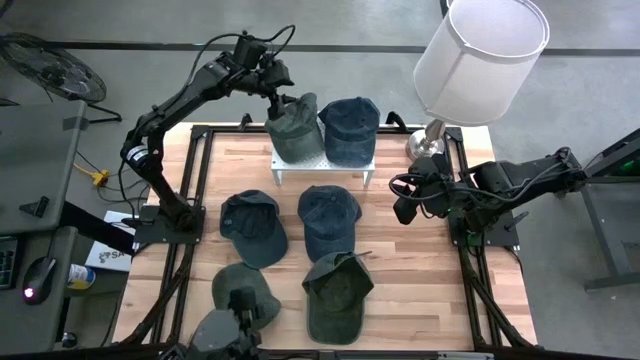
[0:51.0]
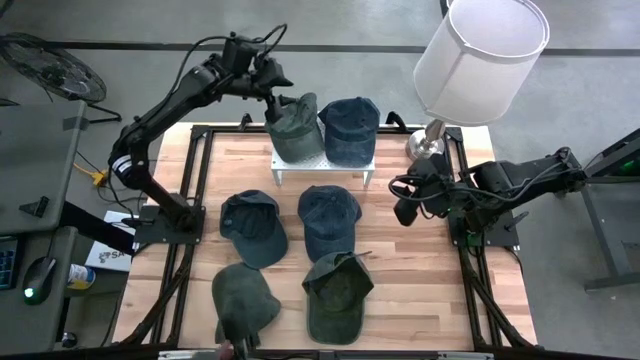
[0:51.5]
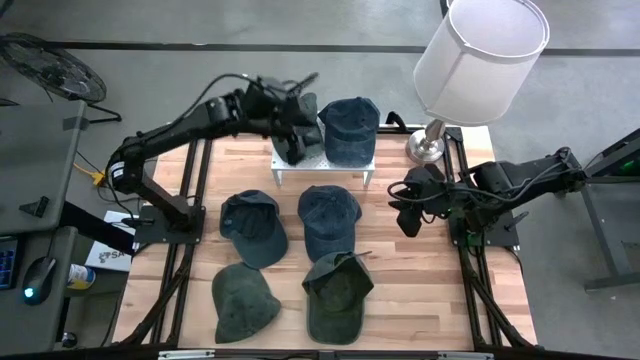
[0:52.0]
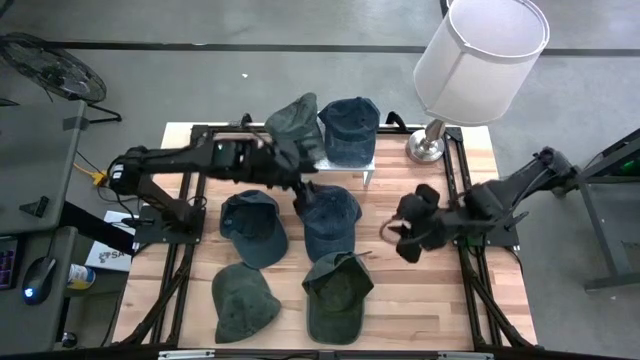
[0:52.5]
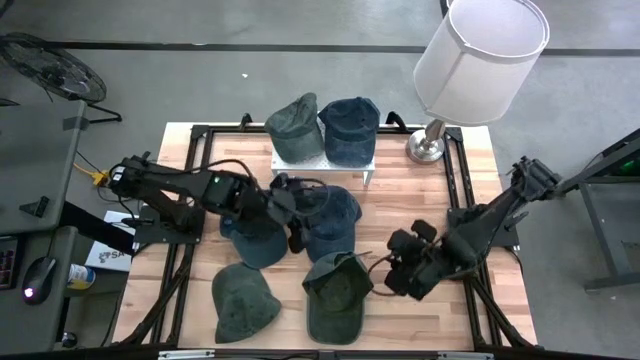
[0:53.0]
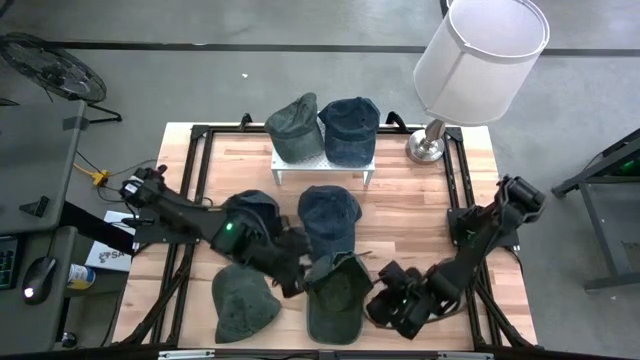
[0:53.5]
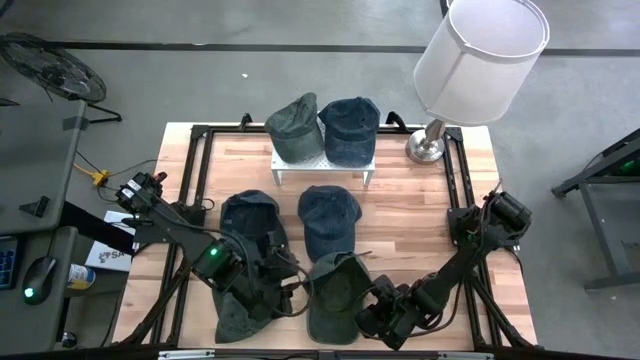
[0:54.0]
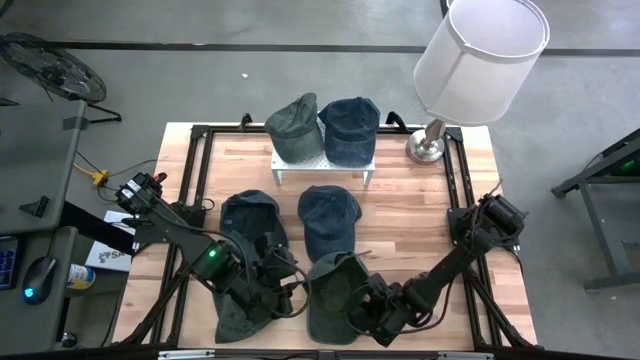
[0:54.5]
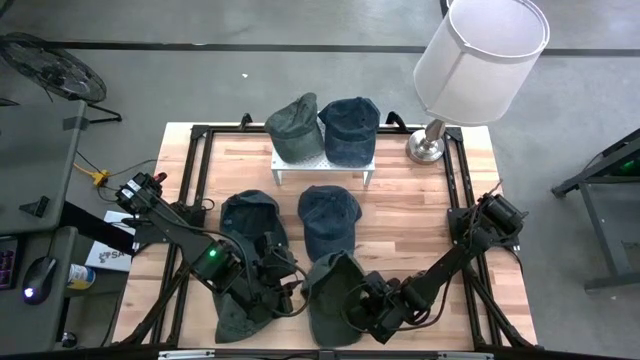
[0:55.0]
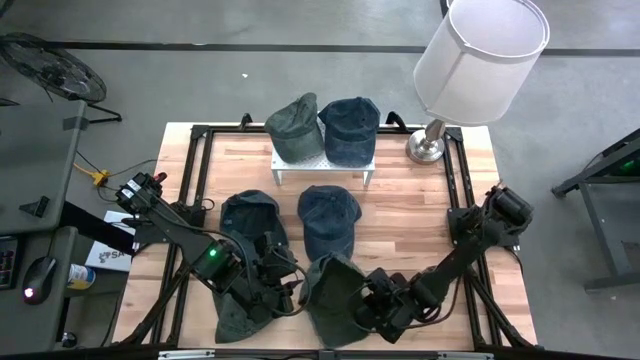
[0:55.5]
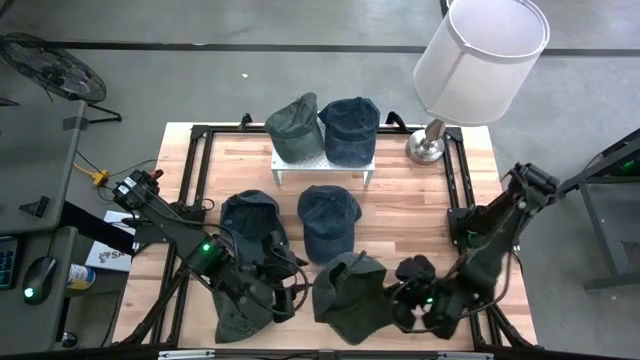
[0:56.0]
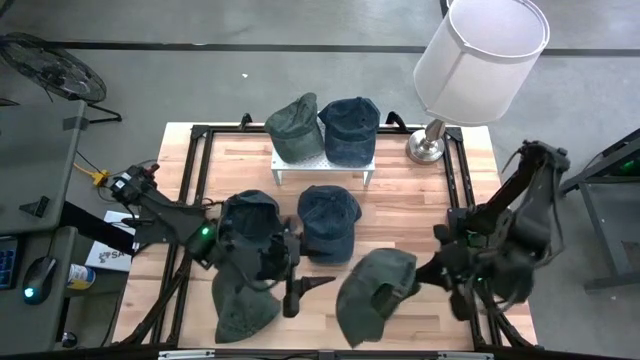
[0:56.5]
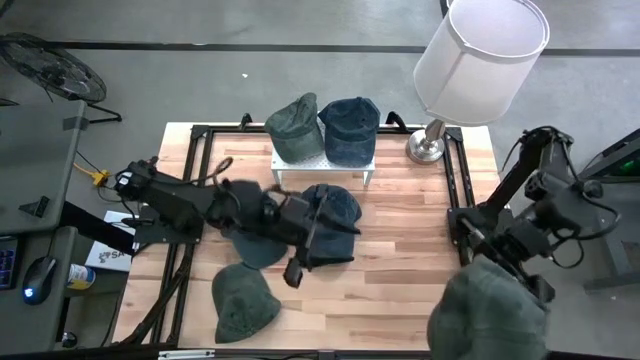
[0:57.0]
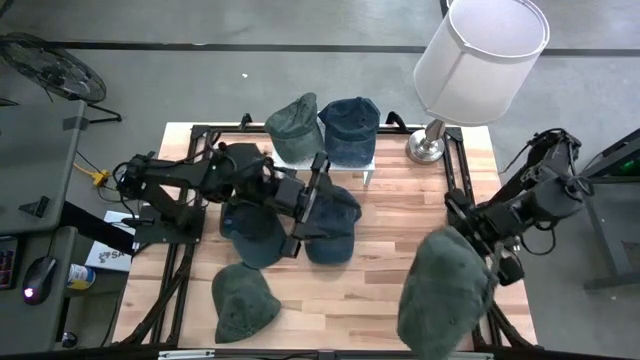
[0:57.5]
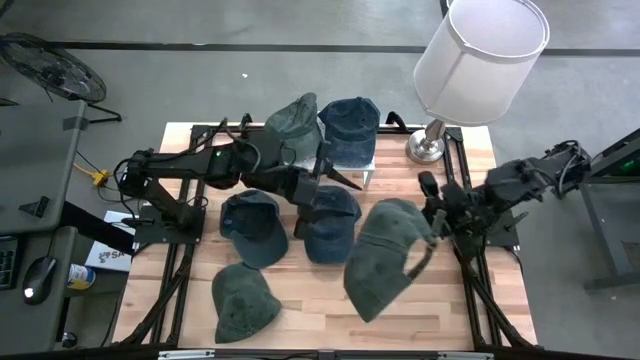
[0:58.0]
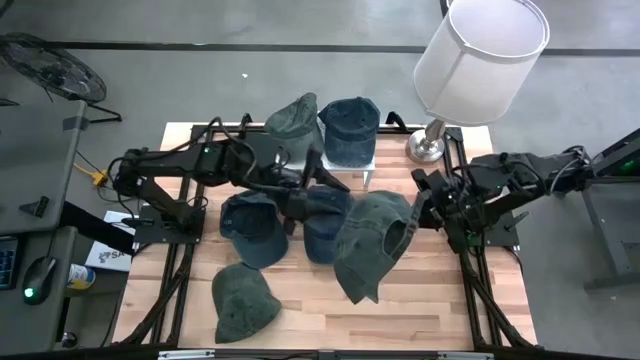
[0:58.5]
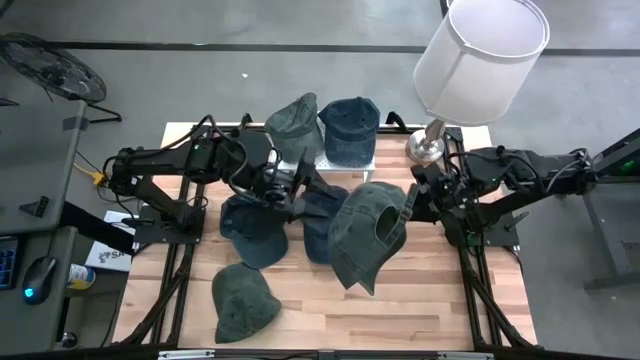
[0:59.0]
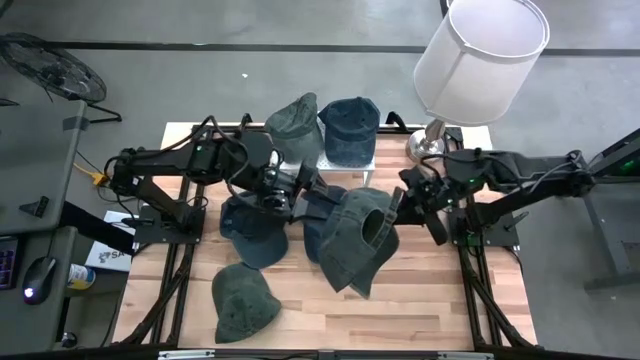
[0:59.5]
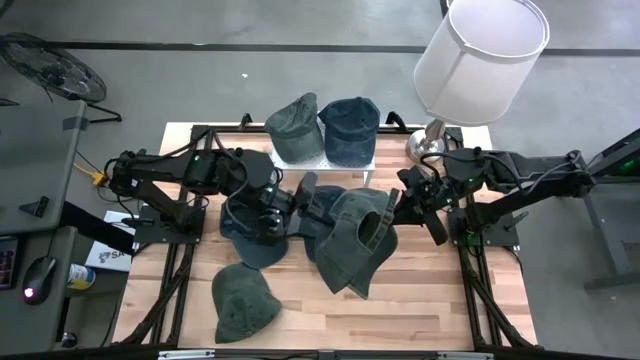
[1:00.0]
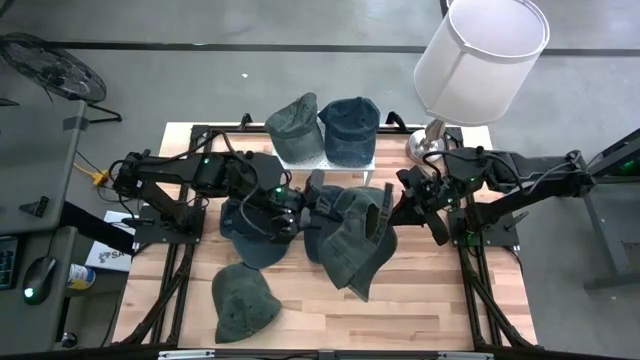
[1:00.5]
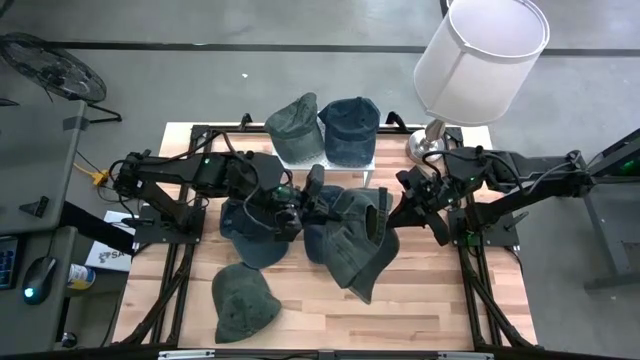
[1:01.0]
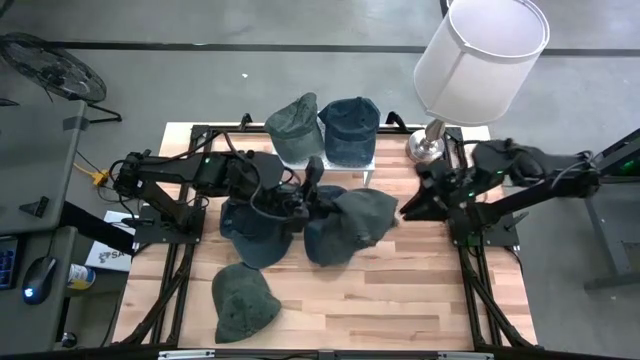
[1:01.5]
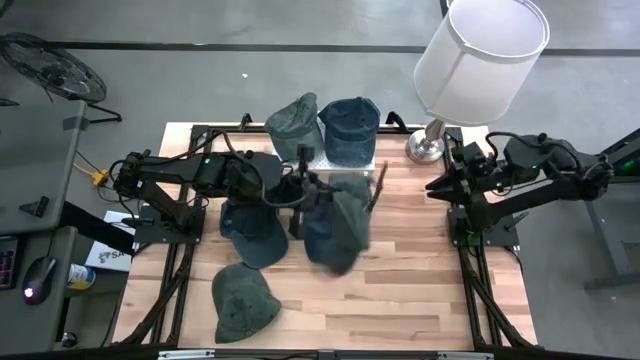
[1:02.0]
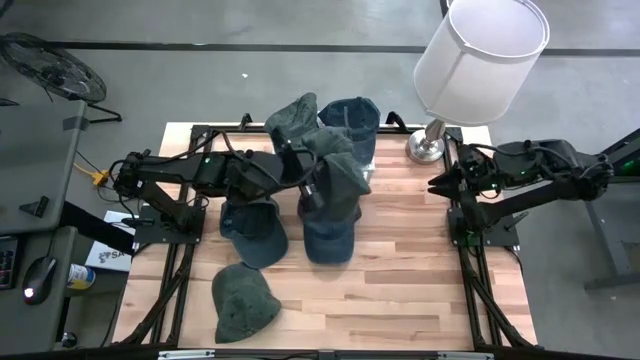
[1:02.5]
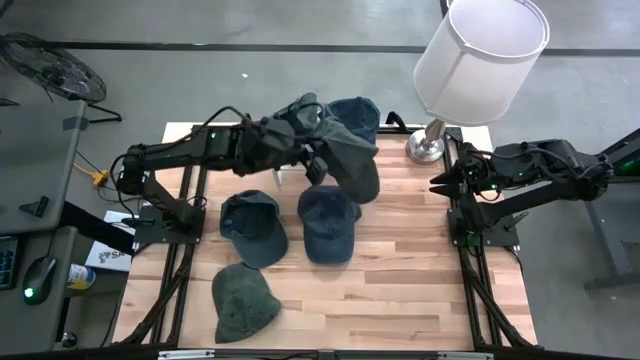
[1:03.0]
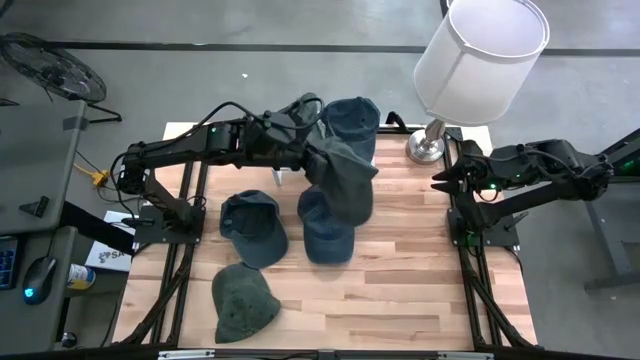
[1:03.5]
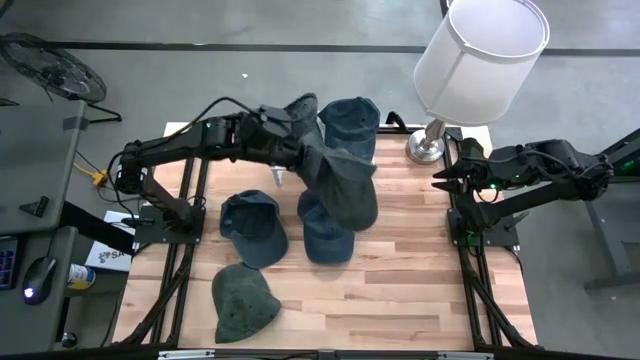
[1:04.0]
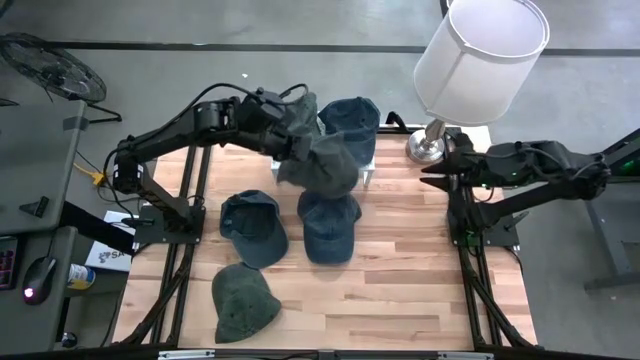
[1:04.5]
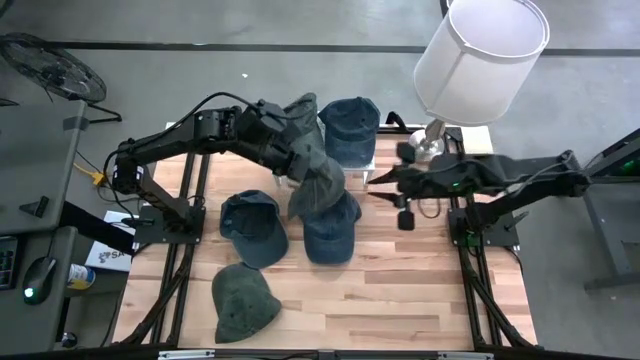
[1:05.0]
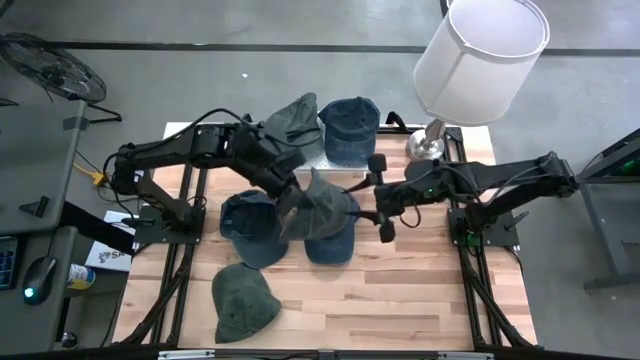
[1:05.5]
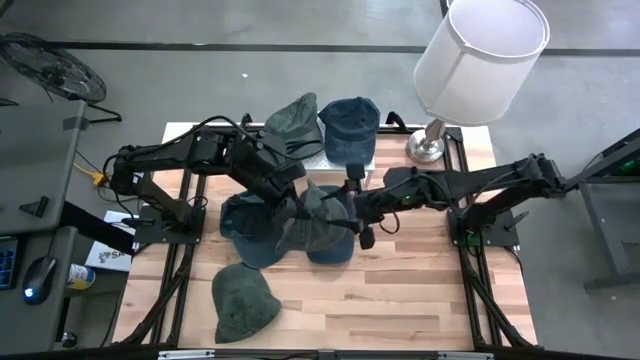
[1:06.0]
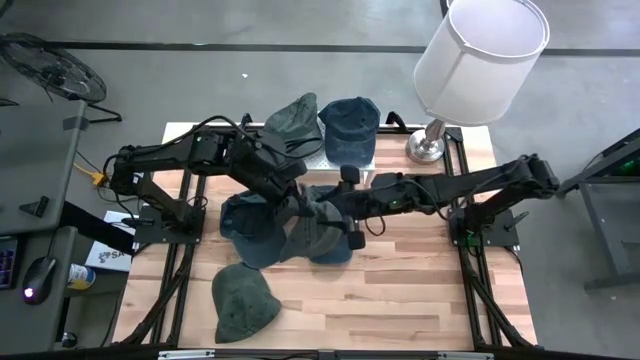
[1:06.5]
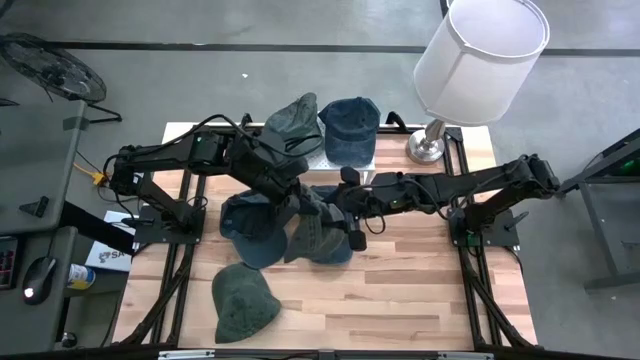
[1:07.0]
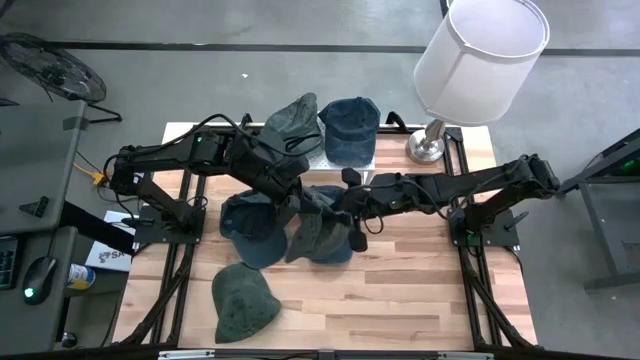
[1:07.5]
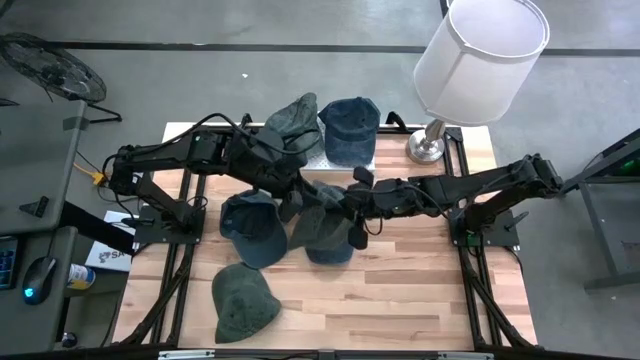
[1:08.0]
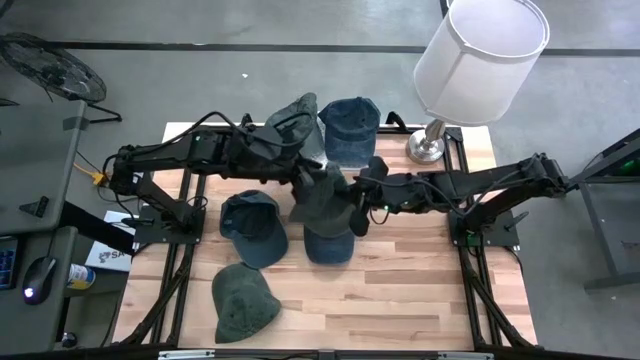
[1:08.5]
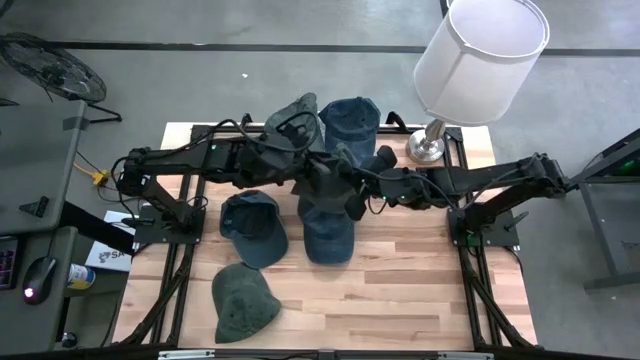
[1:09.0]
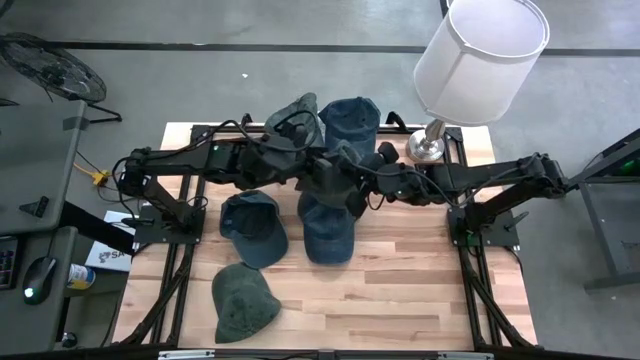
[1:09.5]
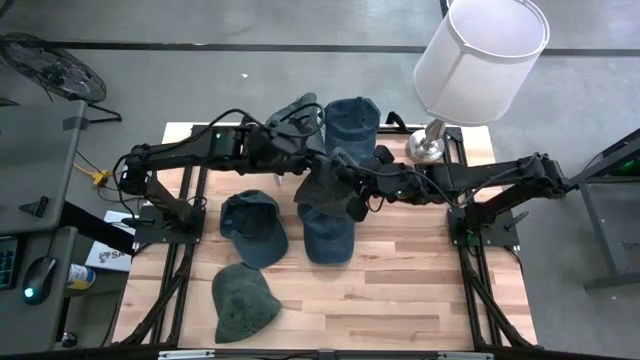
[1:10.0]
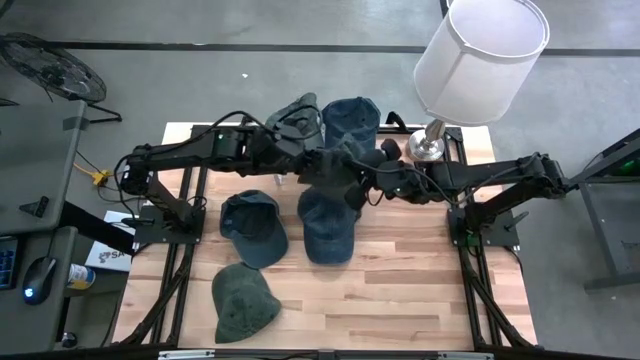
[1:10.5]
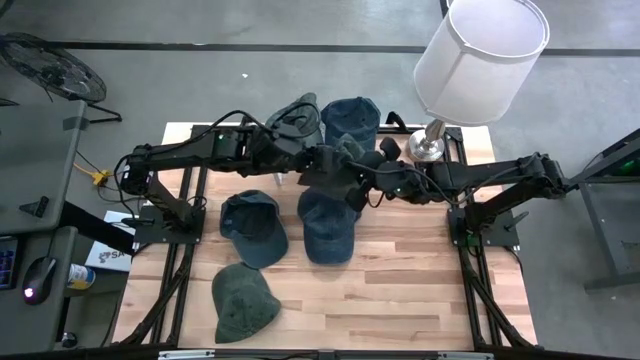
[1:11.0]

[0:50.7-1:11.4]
Task: Pick & Place hat
Stack the right gray cap on top of the gray cap on the shelf

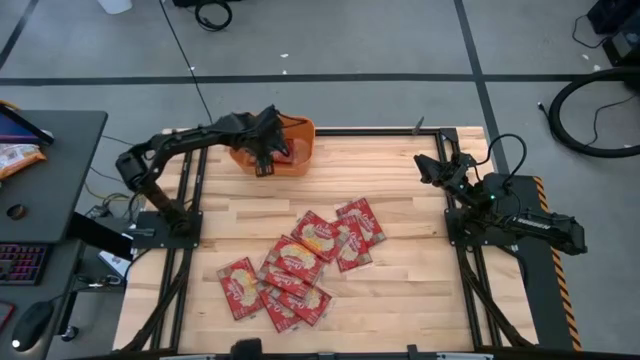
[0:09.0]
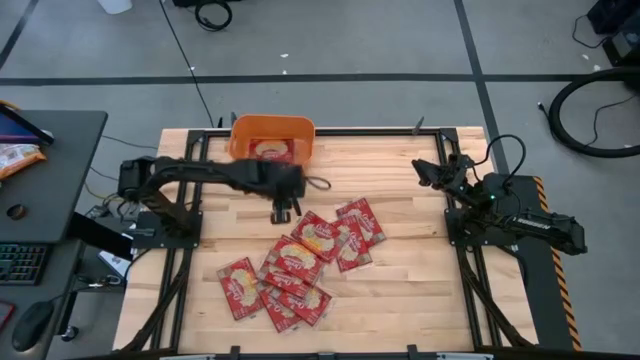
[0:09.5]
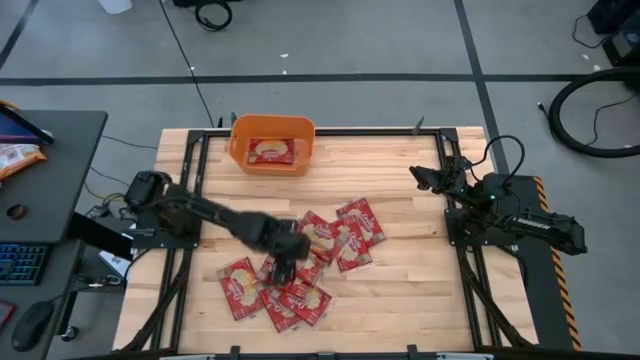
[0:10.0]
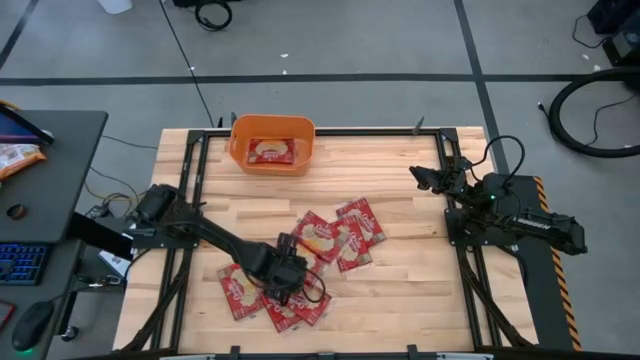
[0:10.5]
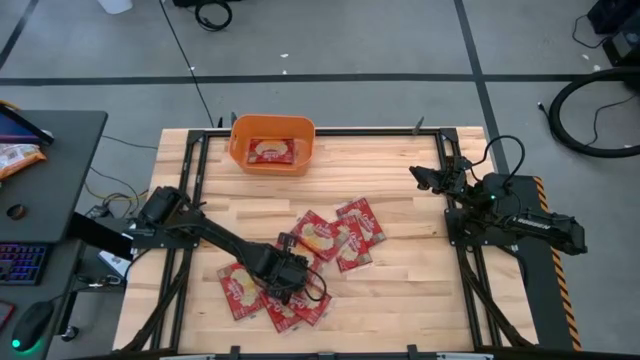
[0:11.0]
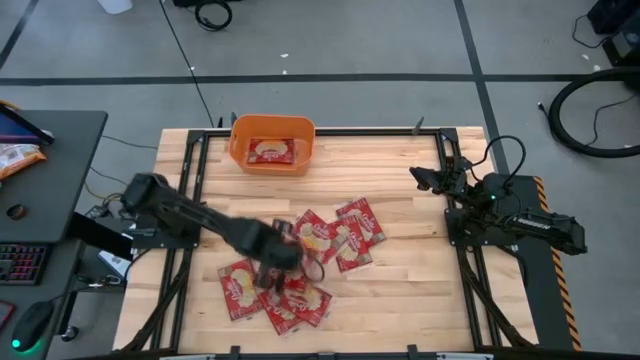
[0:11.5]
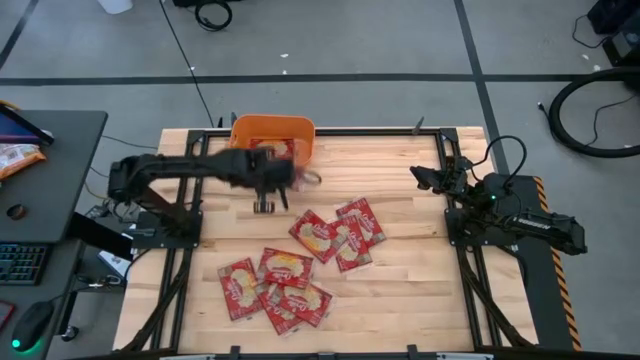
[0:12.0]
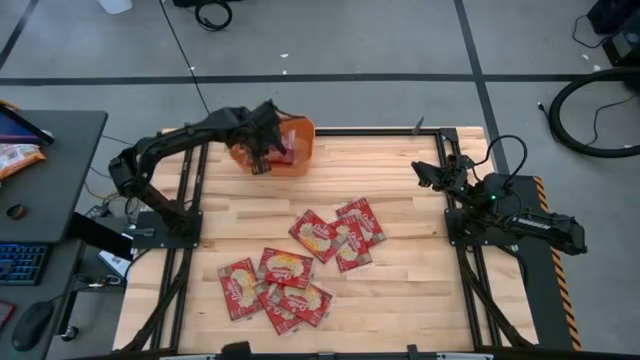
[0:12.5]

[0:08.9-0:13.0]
Task: Sort popcorn bags into baskets
Put the popcorn bag into the orange bin
